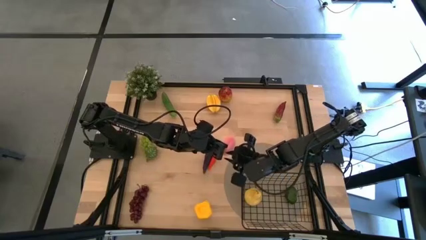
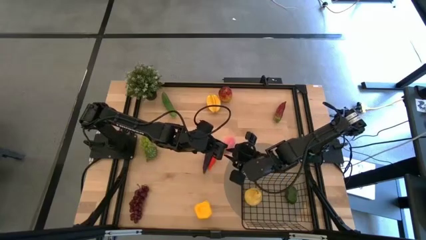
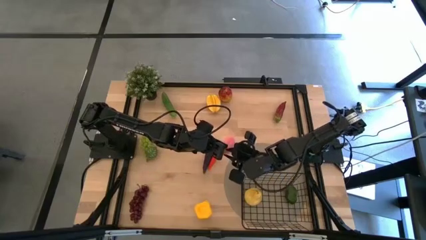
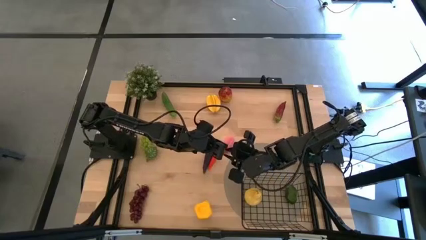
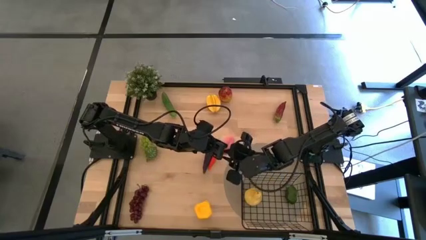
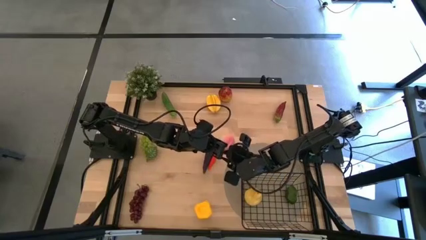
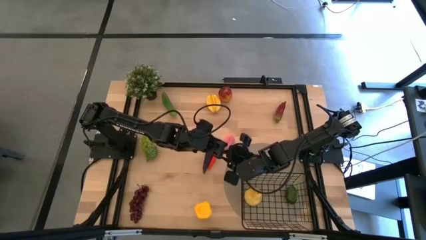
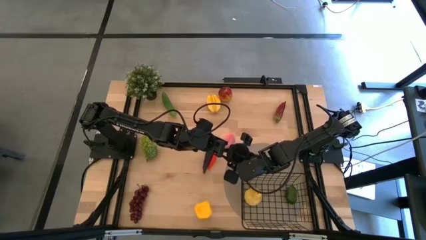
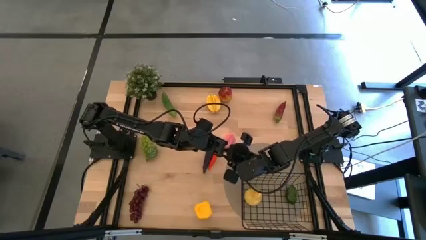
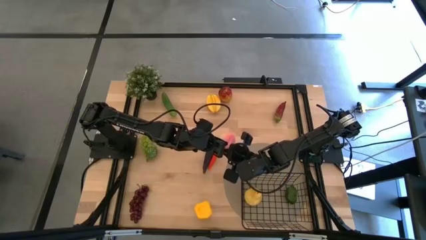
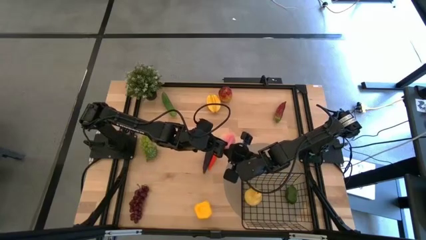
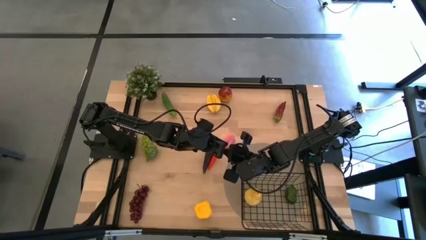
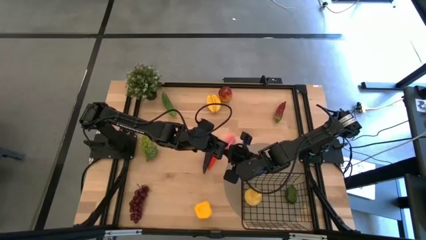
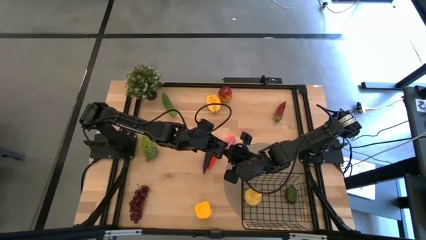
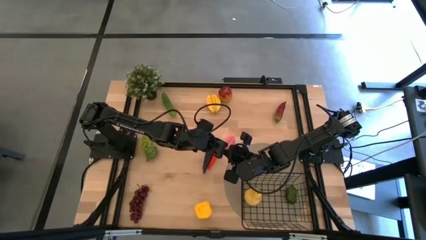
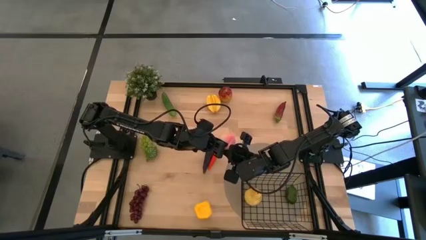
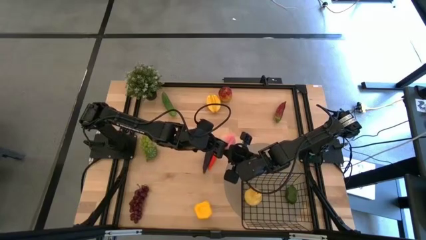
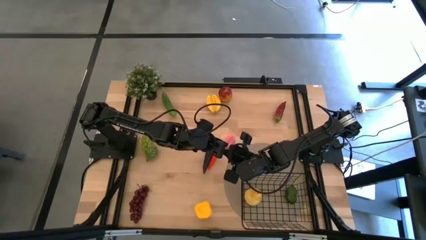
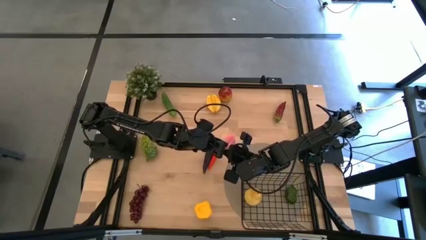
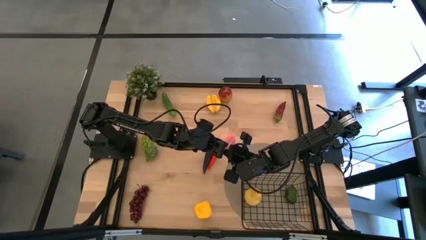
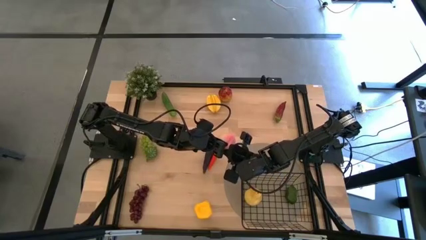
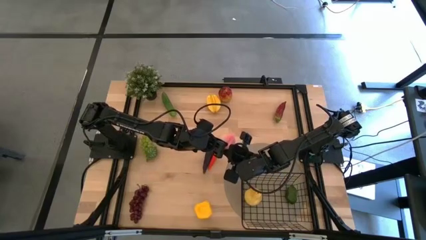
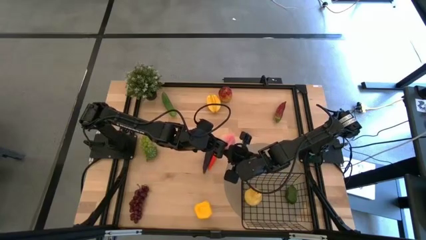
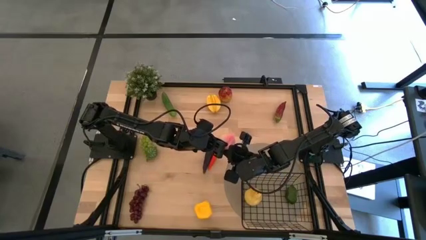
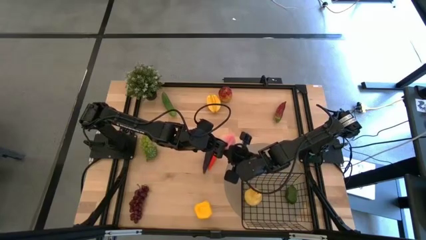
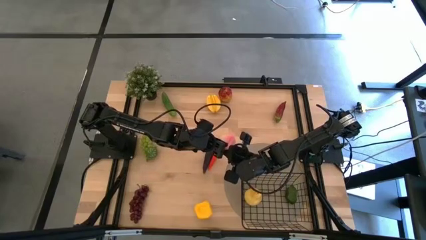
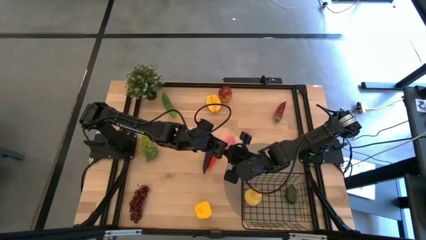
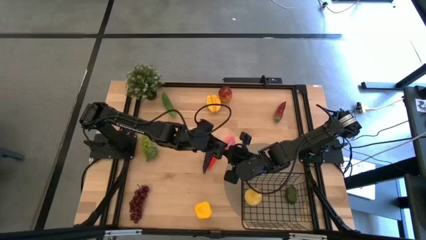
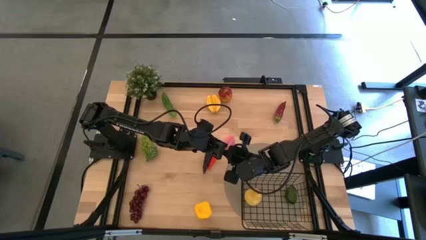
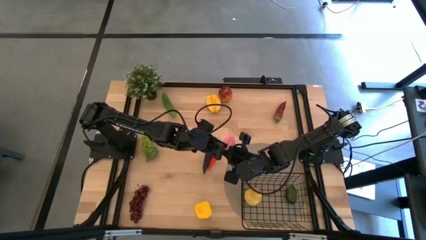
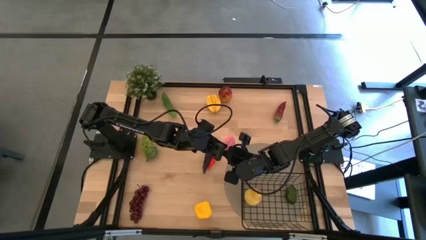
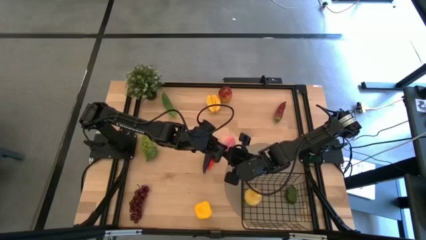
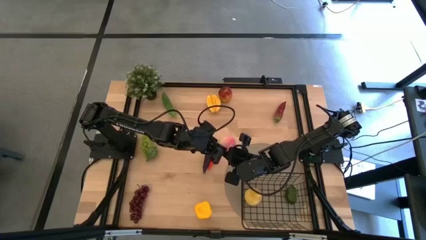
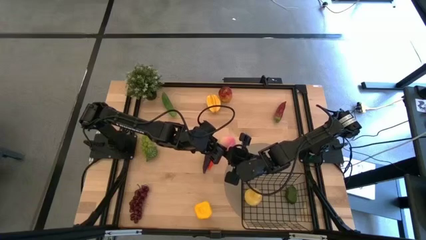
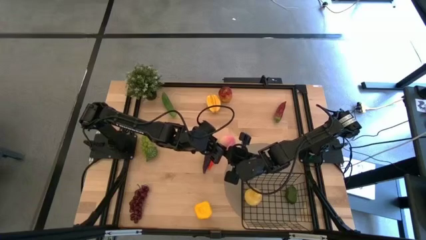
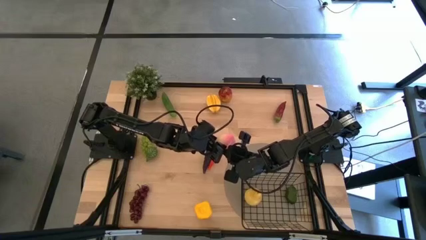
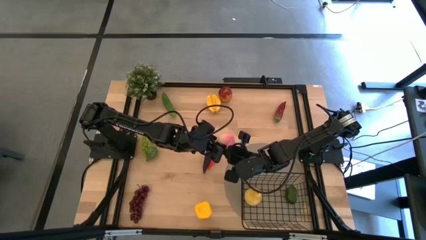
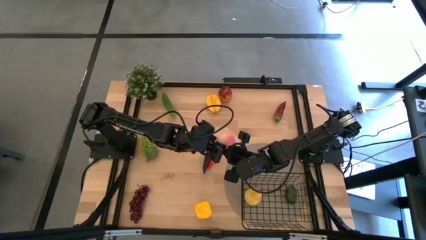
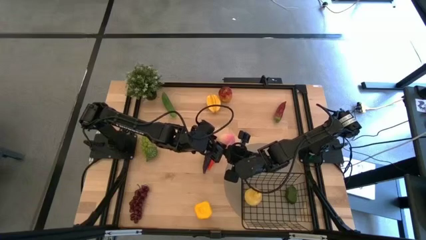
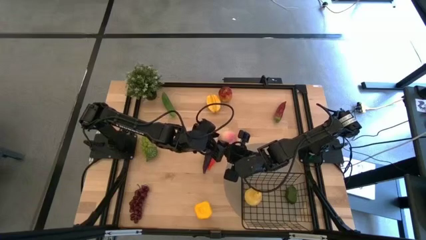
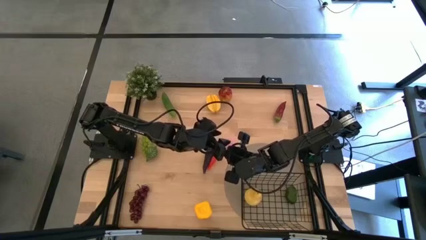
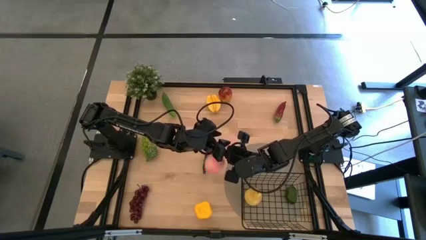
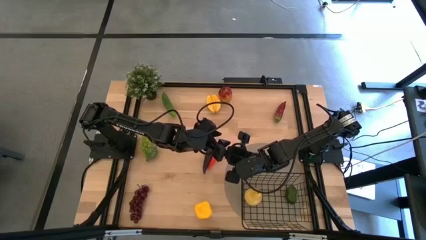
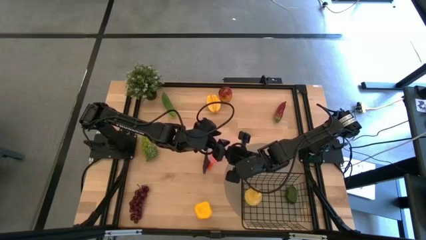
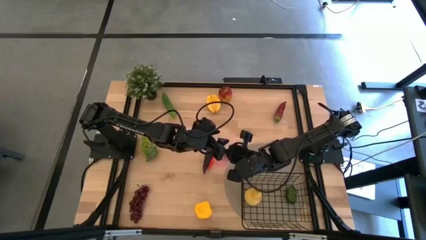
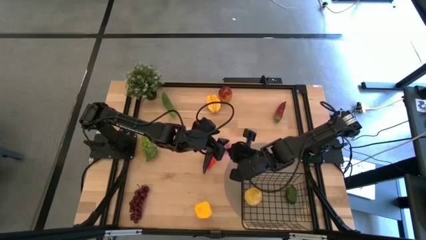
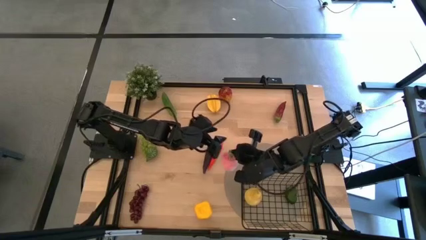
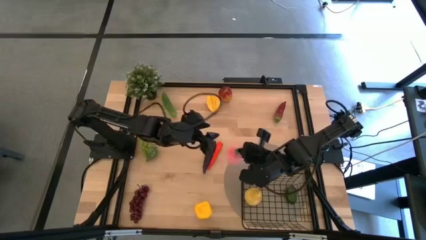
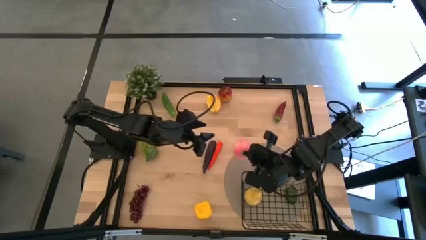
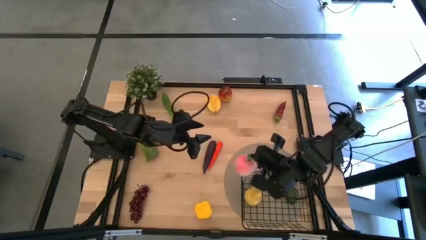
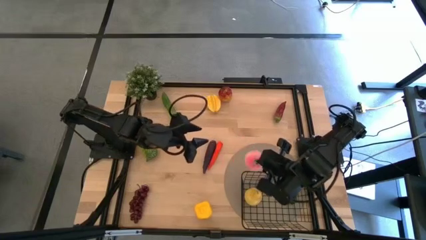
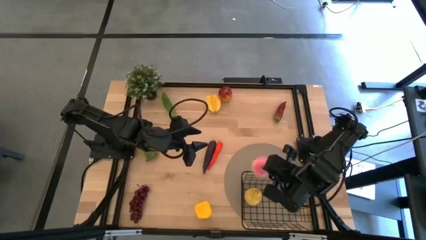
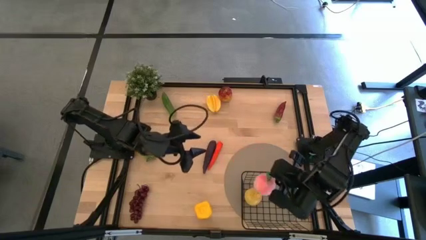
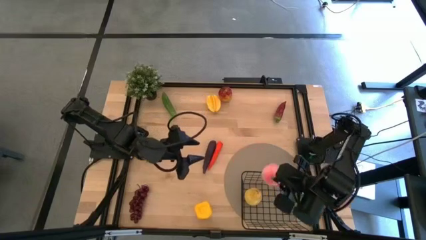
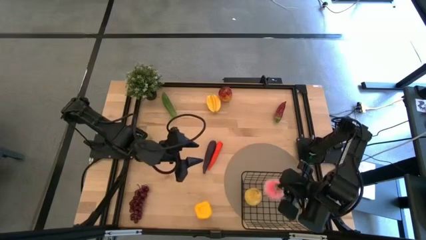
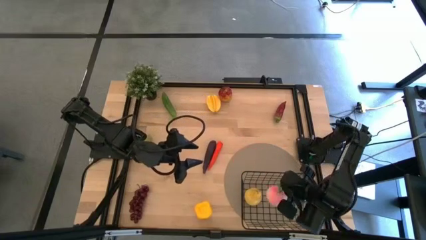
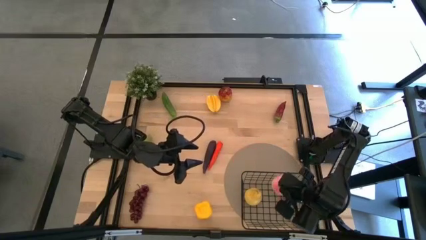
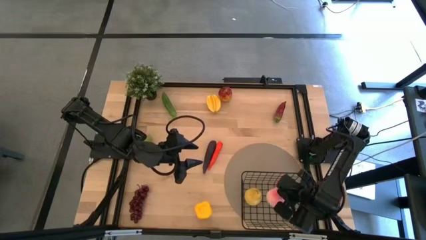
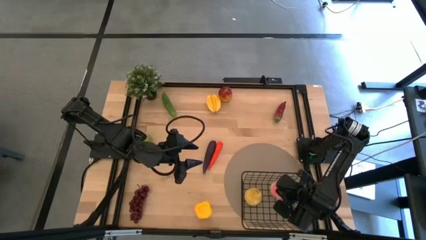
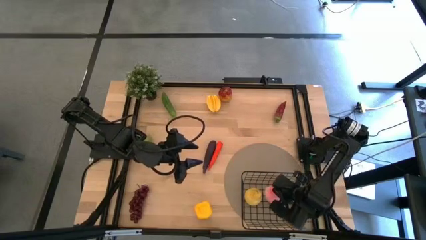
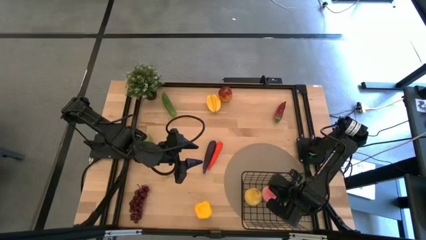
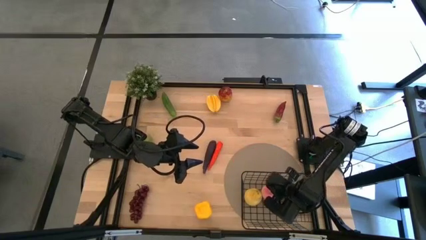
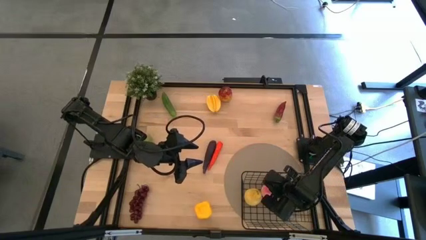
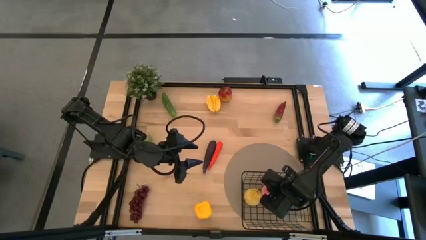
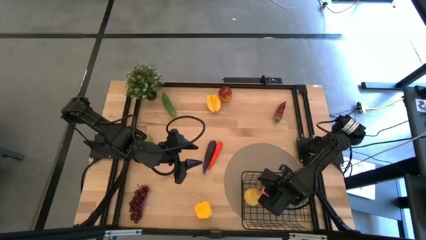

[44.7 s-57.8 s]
Task: Build produce basket
Put the pink peach into the wire basket

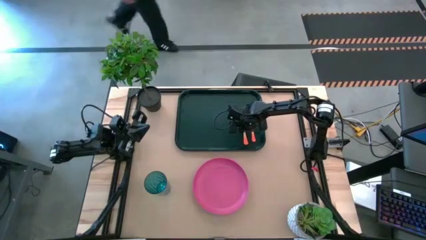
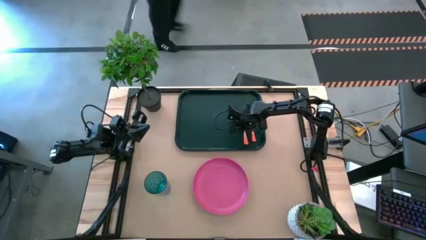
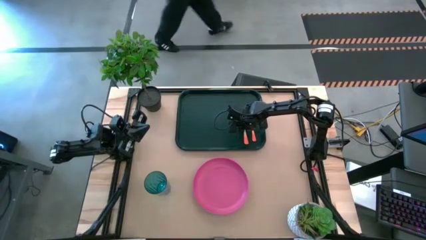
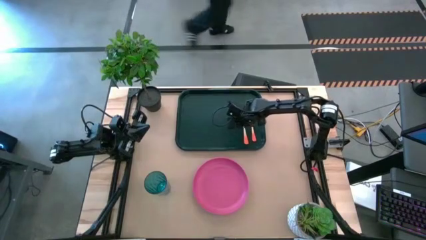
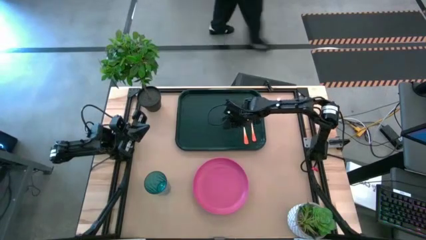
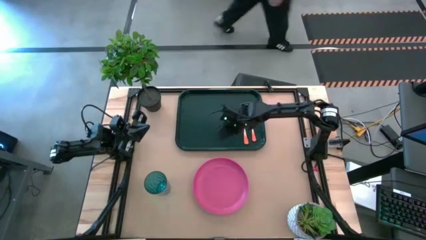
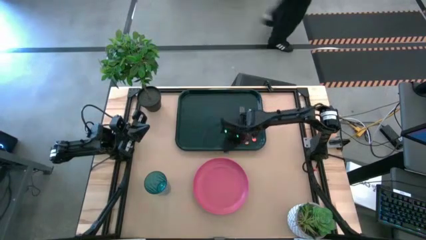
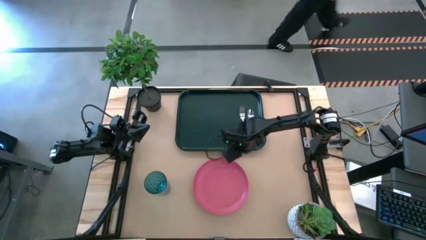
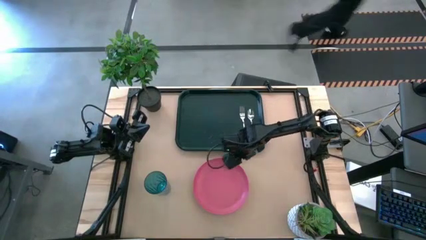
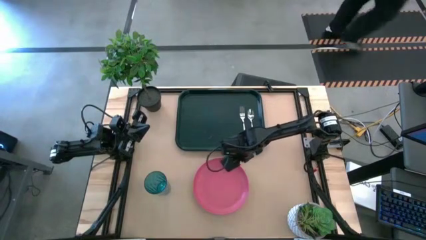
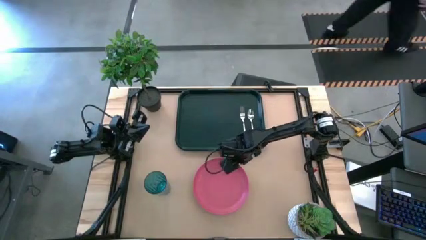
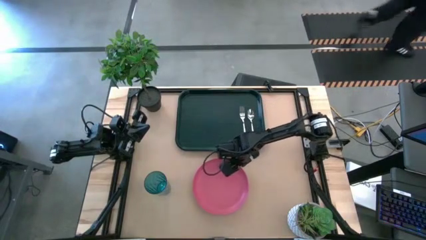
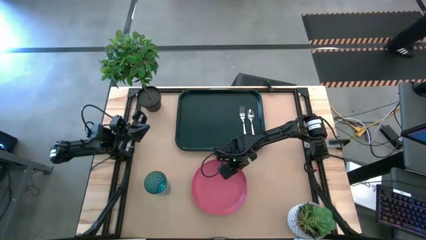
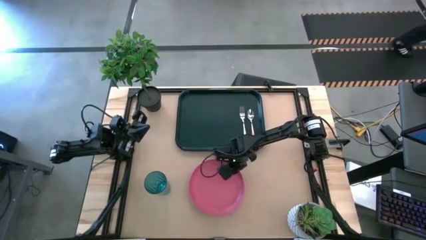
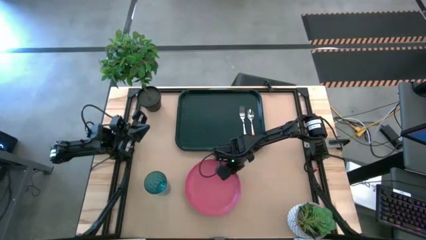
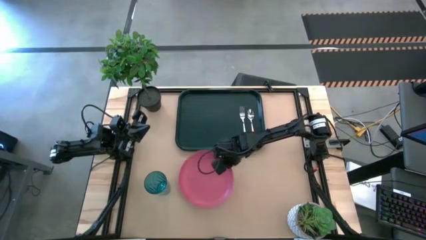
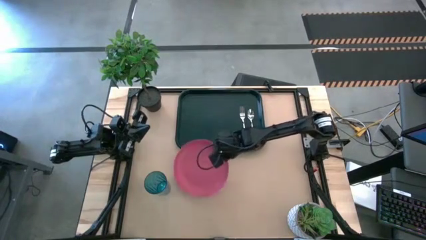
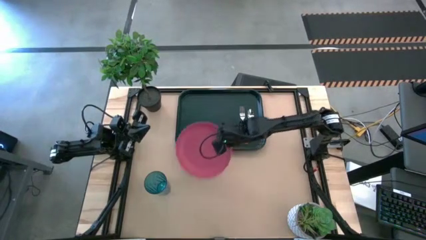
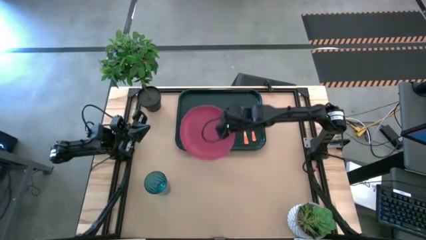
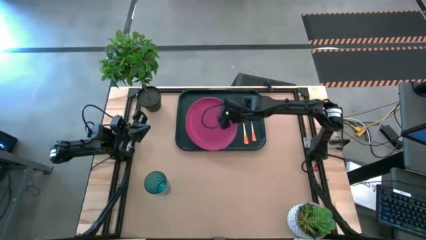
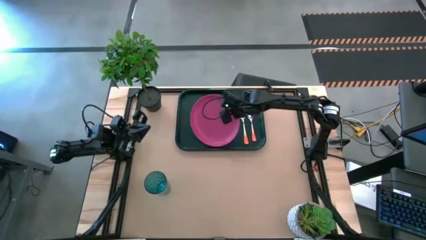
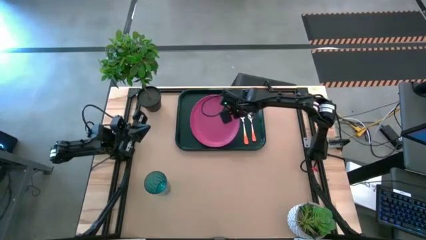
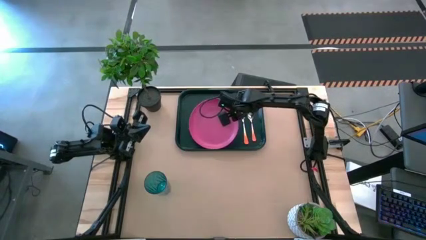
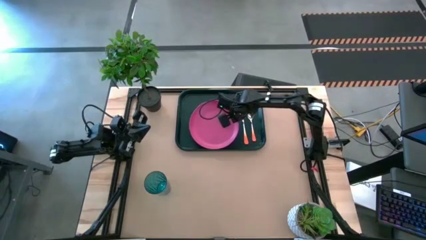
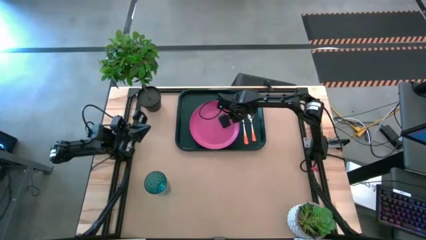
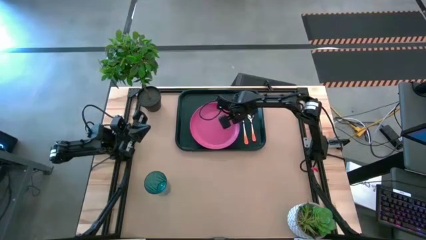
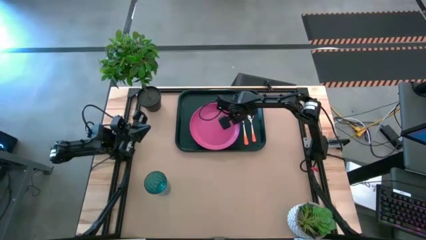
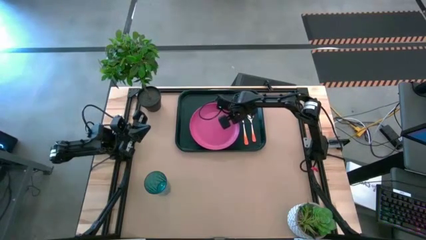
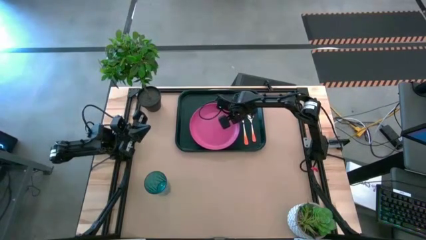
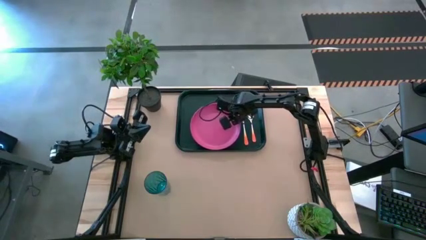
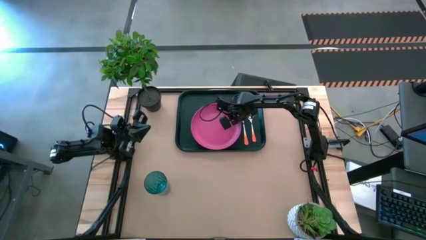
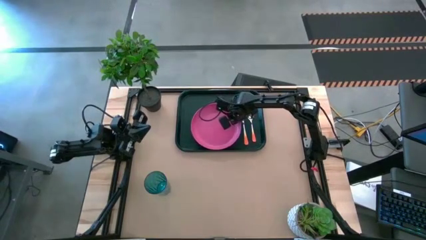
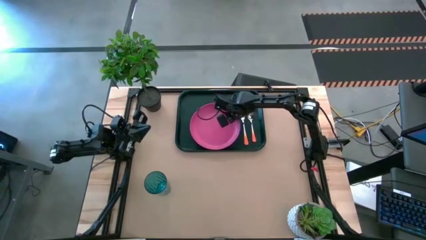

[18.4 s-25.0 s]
Task: Pick and place plate/cup/fork/spoon on tray
Put the pink plate on the green tray to the left of the fork
